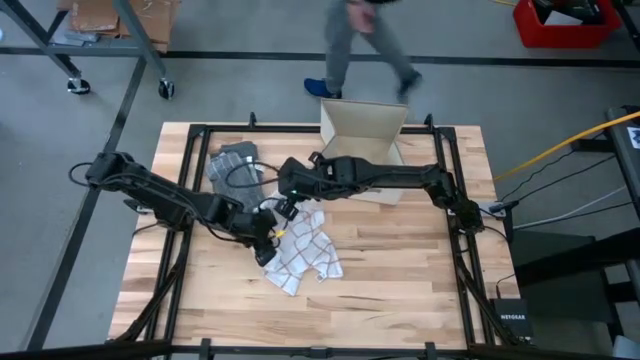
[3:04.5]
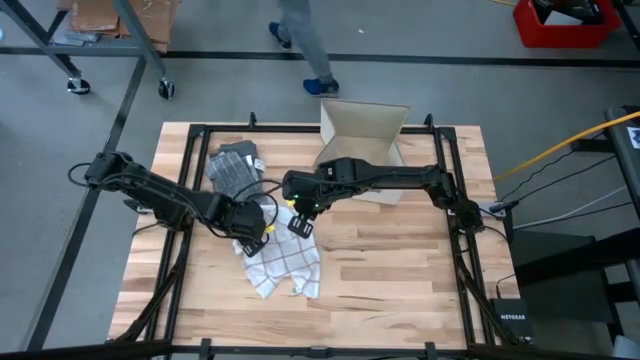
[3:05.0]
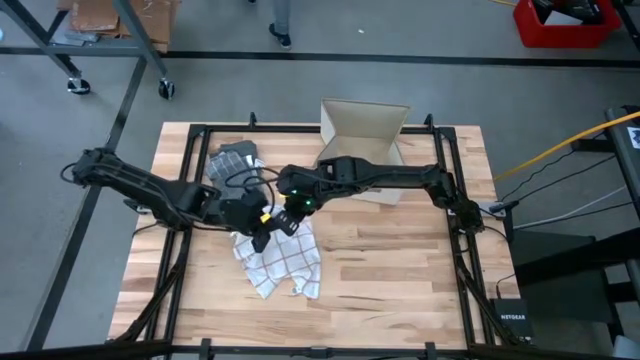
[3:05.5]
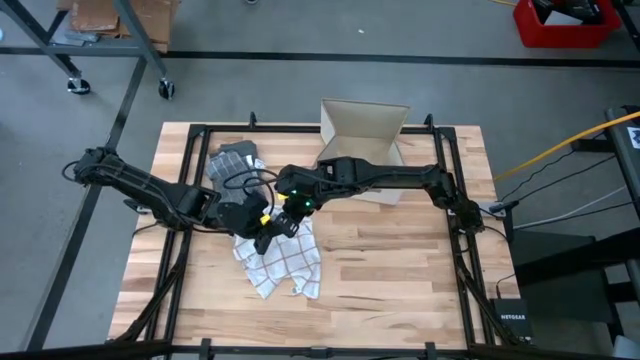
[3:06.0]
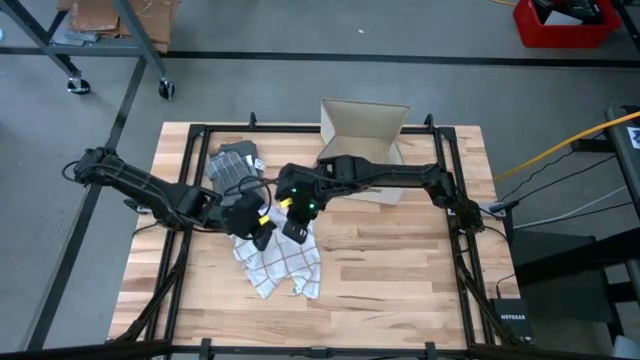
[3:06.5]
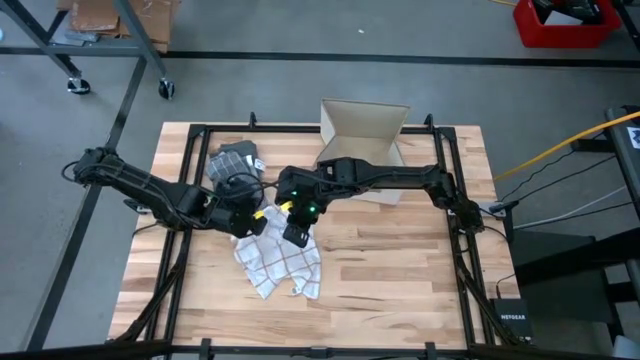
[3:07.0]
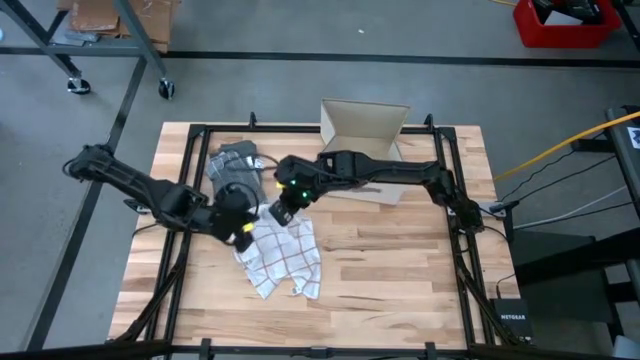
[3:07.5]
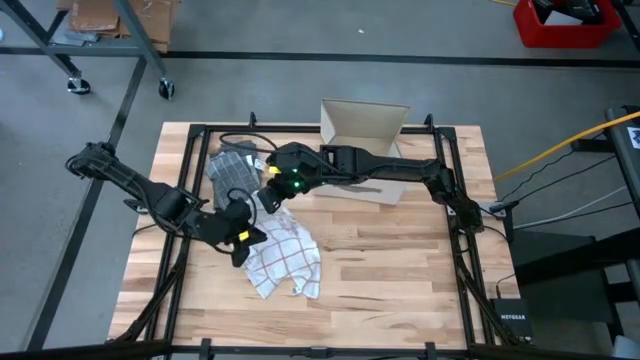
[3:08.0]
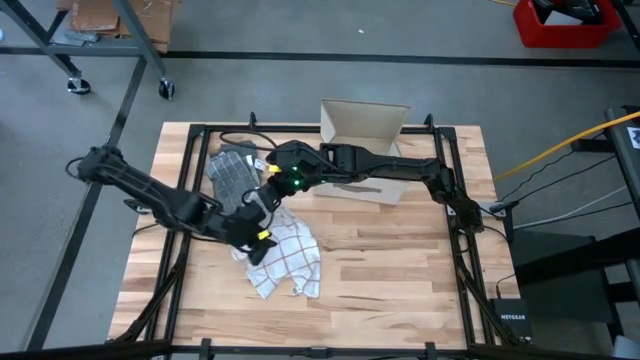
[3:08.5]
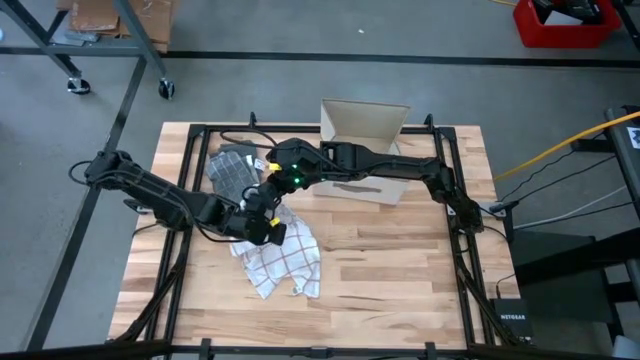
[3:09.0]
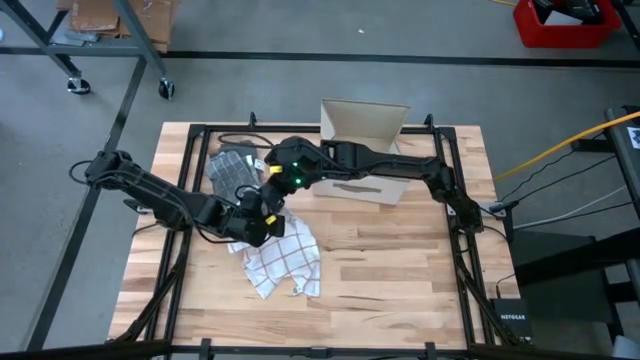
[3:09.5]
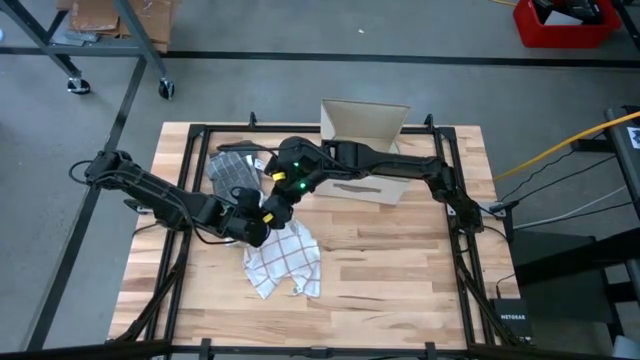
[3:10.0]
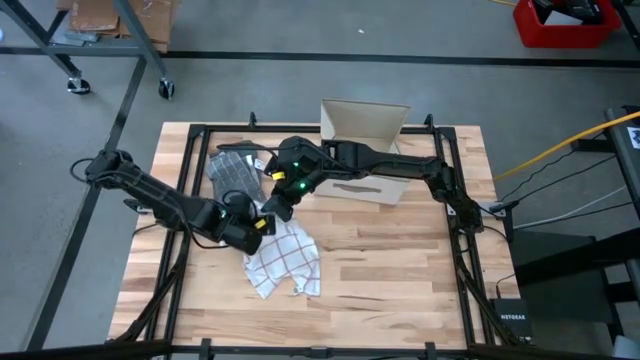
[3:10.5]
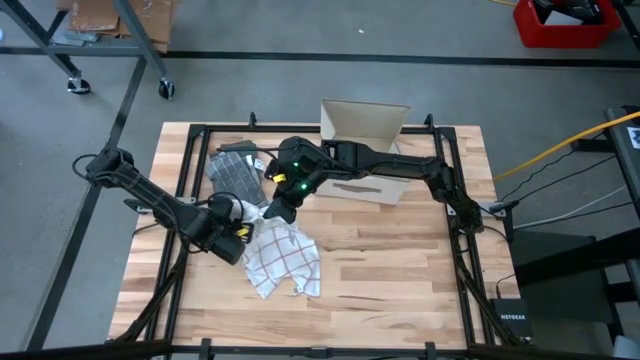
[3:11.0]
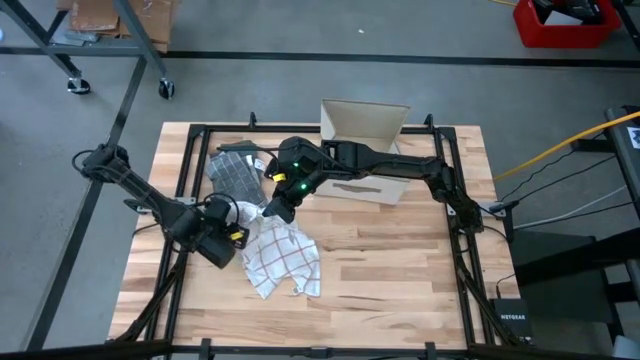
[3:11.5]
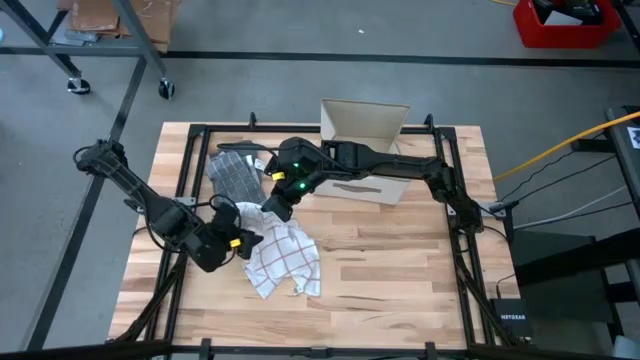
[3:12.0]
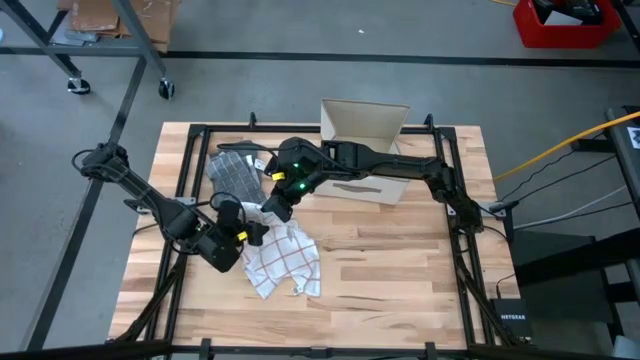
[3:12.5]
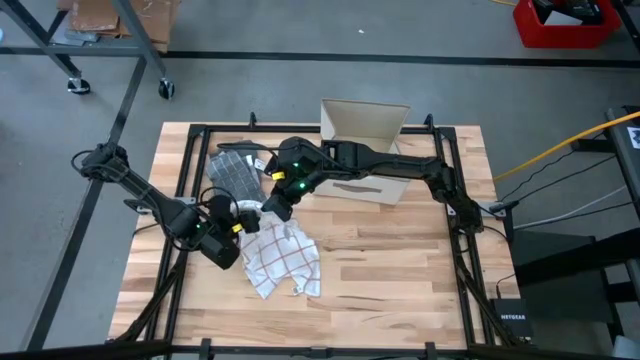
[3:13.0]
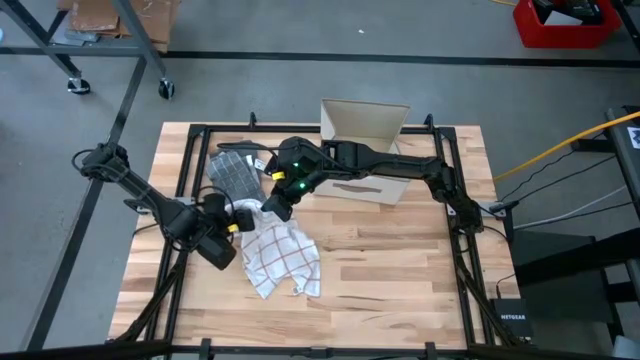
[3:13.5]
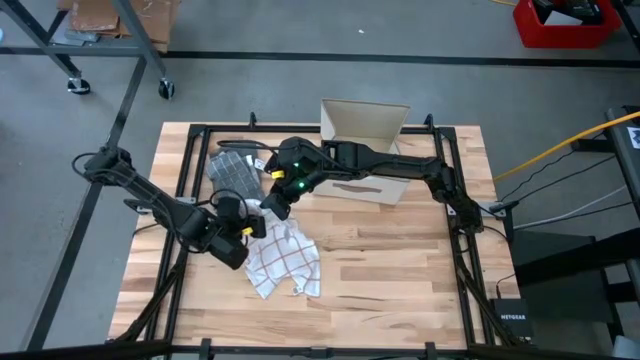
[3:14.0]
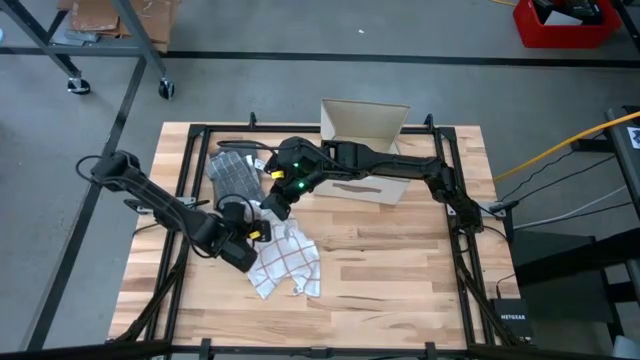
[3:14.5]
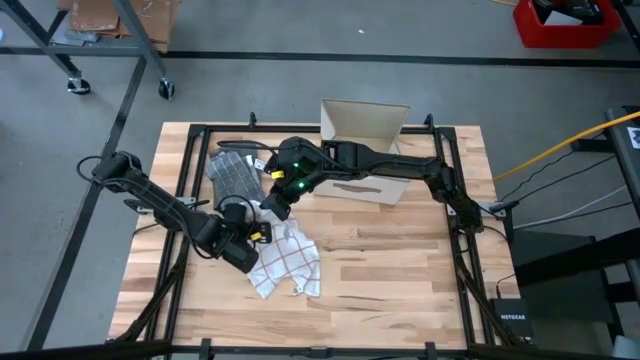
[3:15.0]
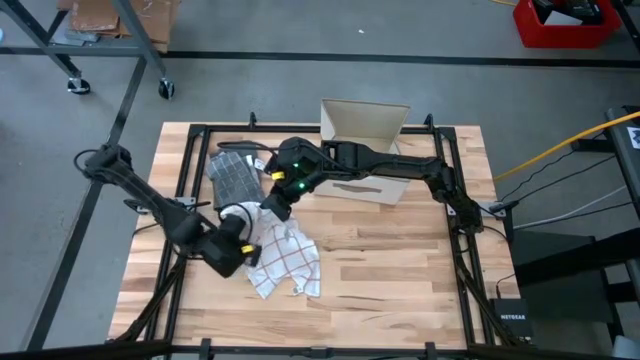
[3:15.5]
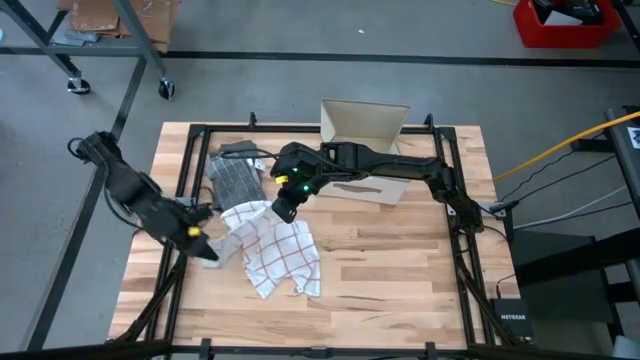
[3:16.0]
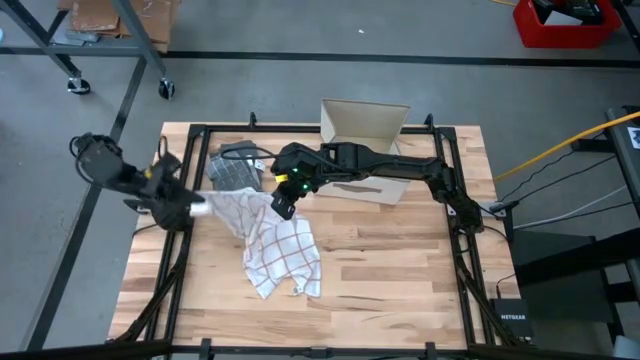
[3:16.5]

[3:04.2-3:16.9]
Task: Fold towel
Fold the white towel

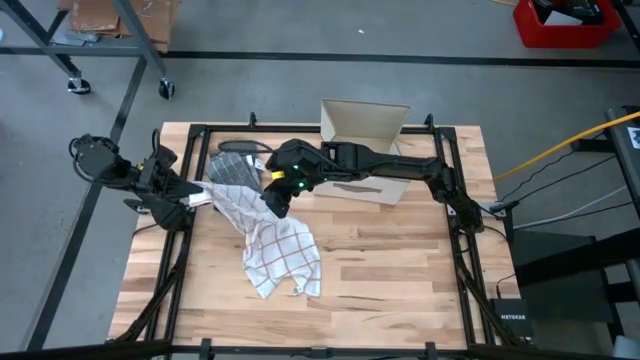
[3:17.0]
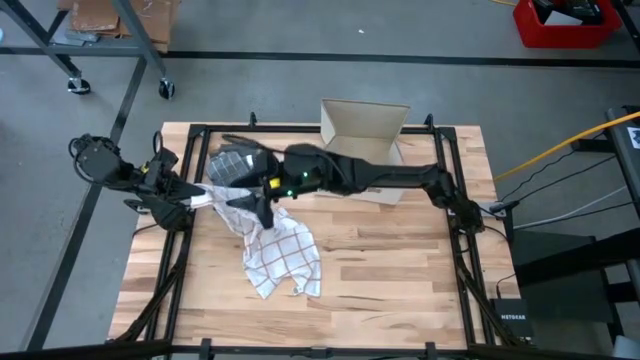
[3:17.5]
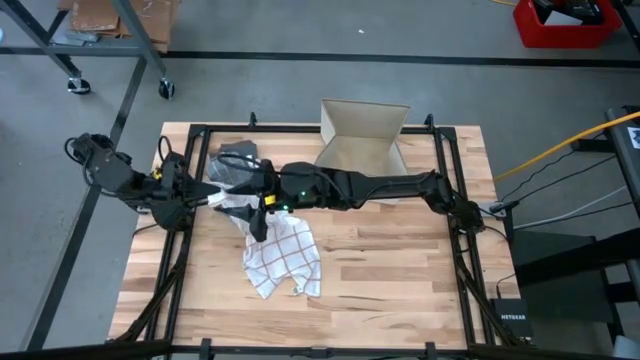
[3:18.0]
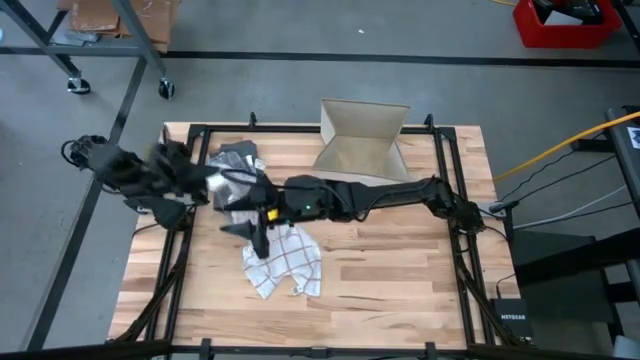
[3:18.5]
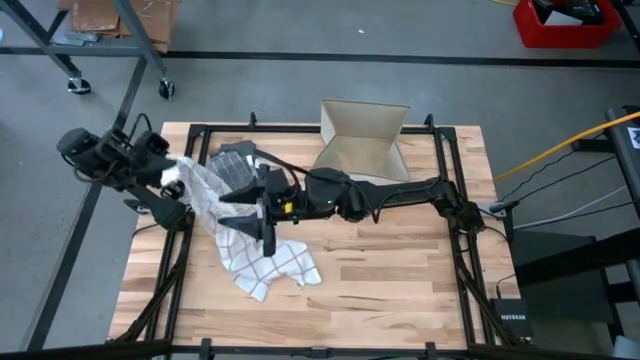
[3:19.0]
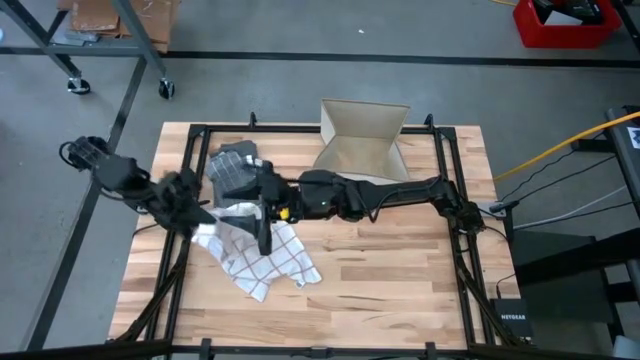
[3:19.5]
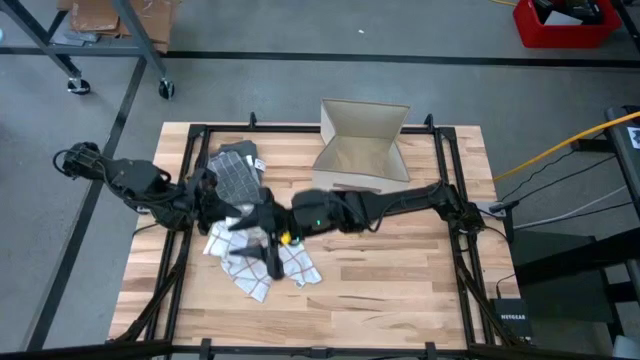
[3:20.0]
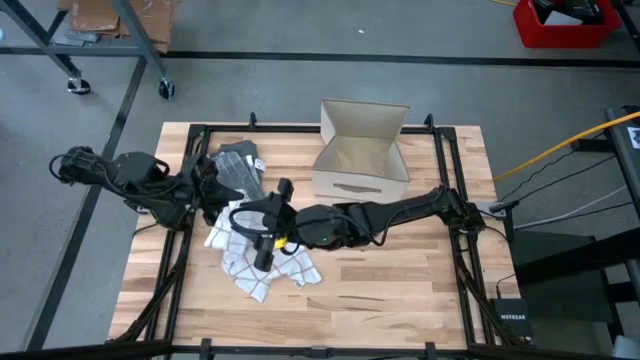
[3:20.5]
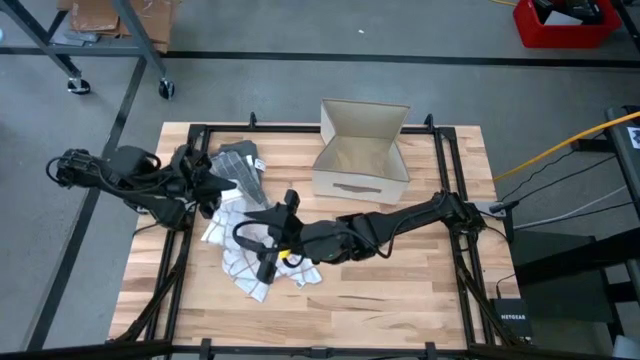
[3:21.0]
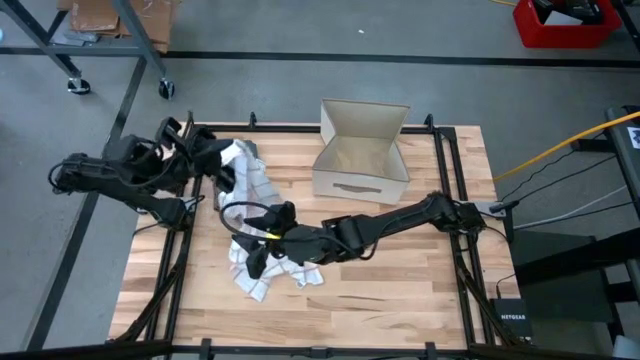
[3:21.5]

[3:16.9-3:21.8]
Fold the white towel
